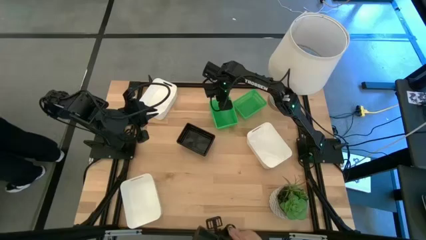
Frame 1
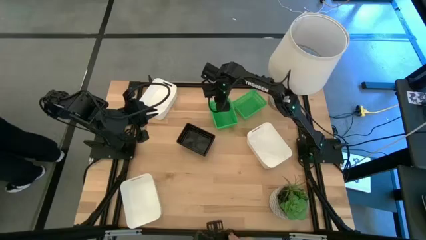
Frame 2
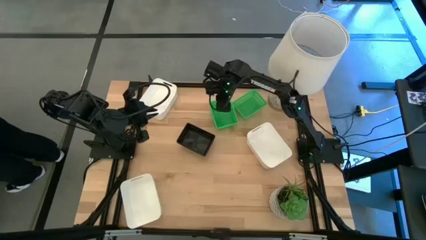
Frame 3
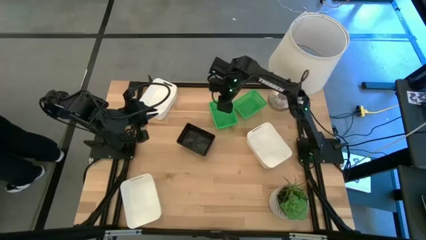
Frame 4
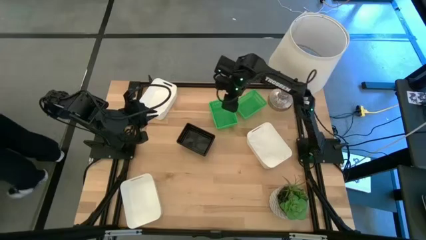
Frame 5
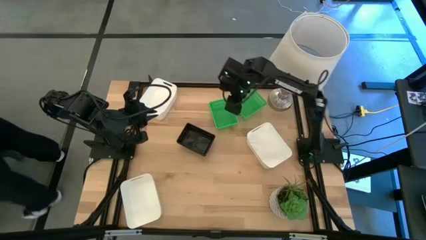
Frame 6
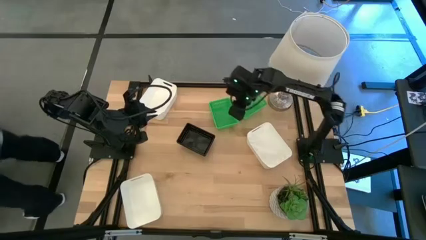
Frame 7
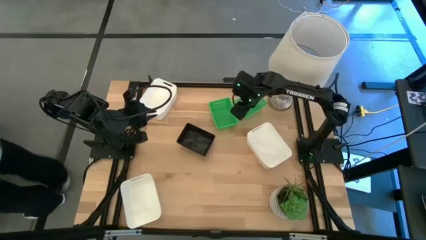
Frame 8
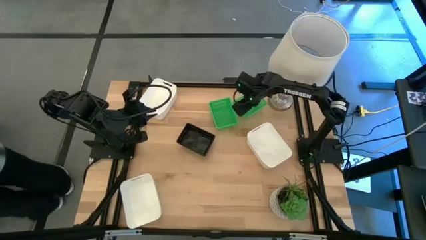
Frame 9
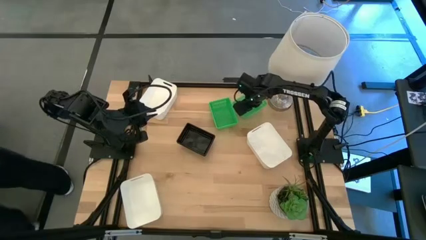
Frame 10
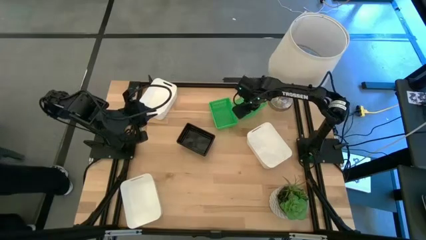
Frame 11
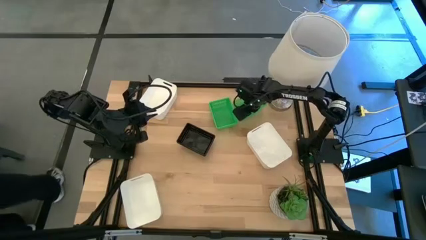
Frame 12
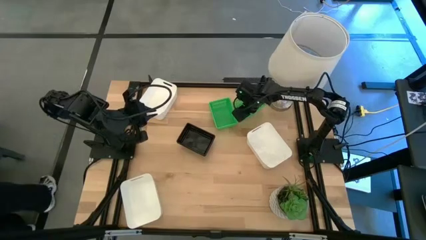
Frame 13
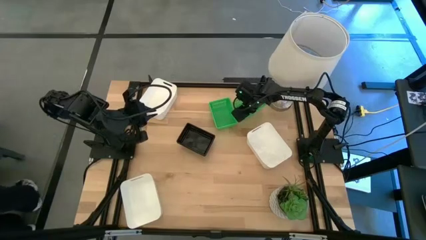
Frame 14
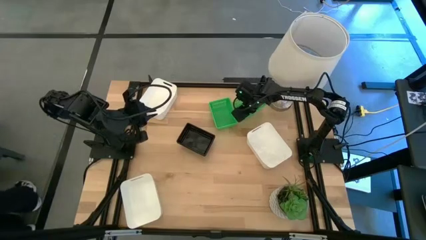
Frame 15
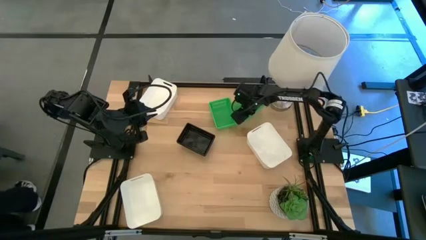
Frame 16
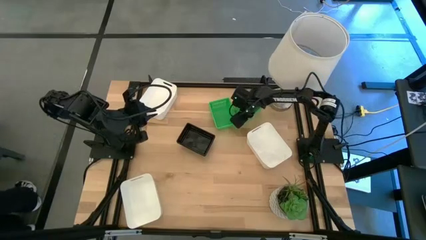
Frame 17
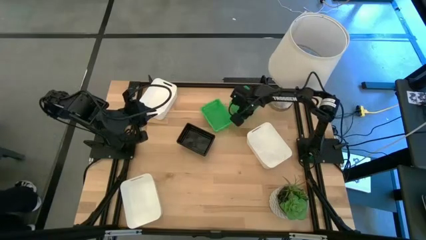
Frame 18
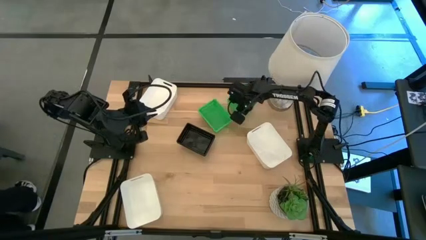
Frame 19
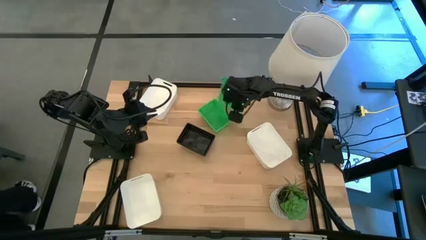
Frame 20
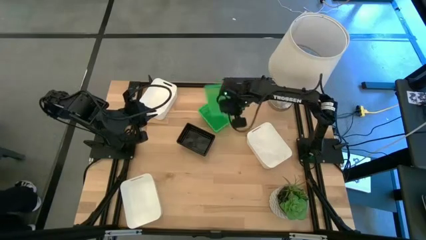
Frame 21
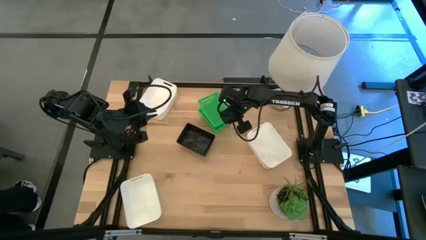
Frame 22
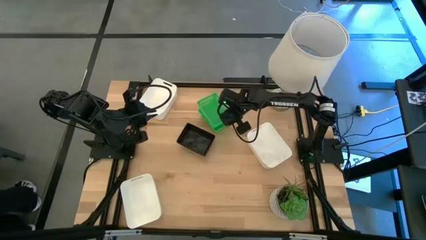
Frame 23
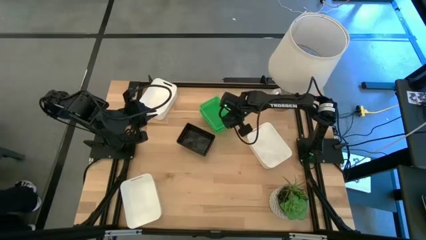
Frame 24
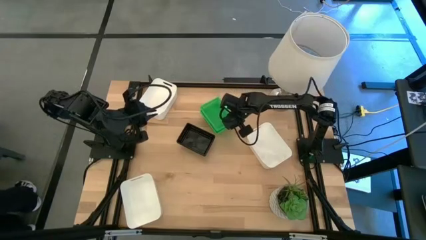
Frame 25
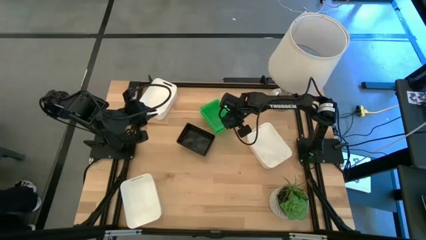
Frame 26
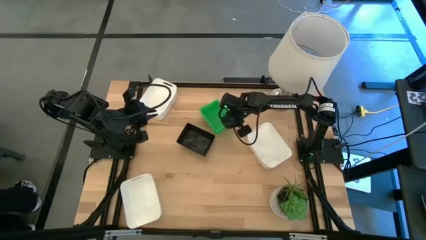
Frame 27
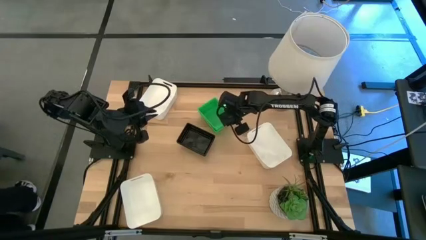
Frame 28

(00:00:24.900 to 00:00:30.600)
Stack the right green bin on the left green bins

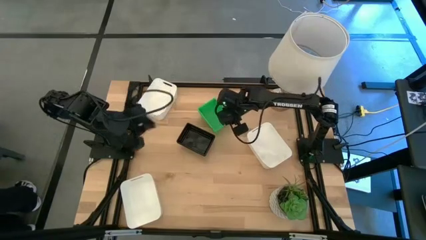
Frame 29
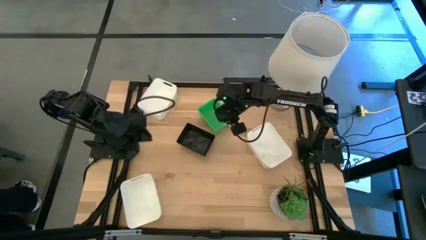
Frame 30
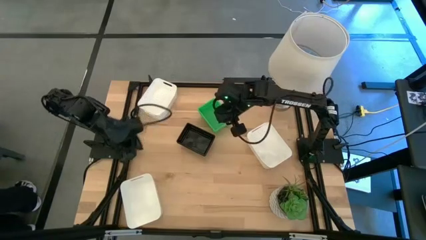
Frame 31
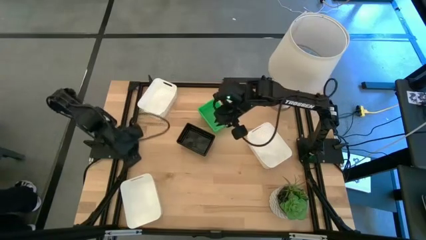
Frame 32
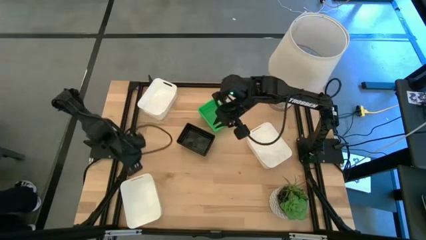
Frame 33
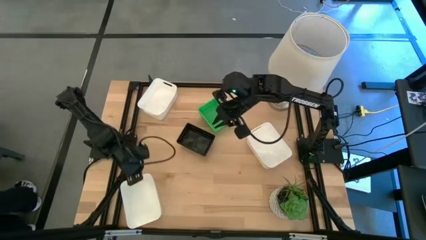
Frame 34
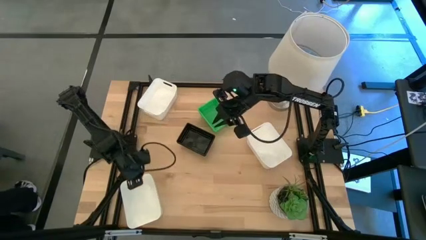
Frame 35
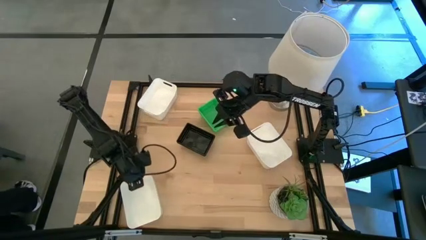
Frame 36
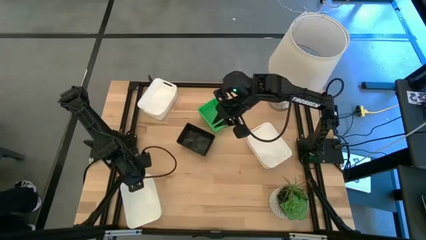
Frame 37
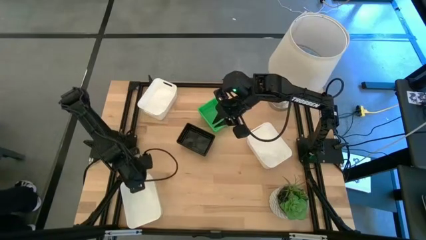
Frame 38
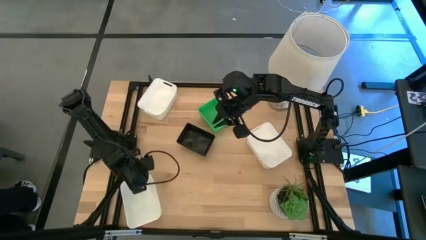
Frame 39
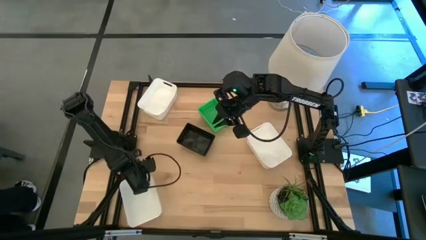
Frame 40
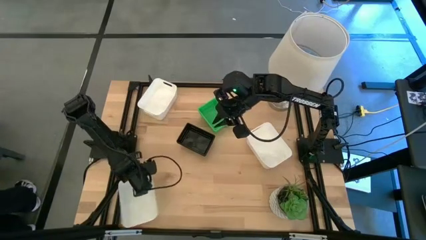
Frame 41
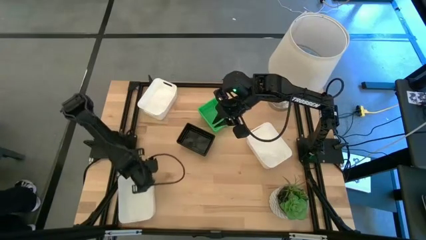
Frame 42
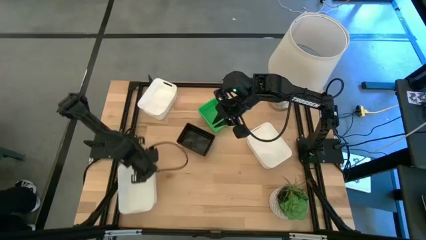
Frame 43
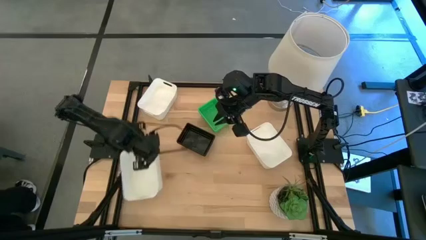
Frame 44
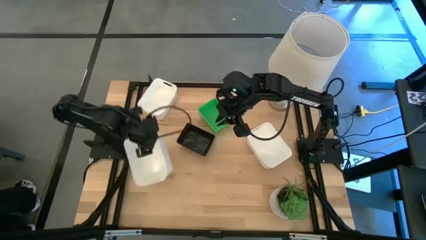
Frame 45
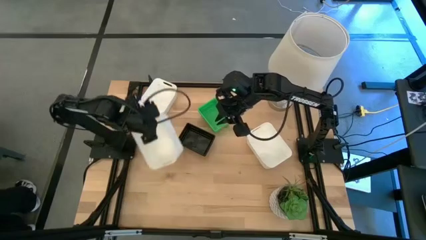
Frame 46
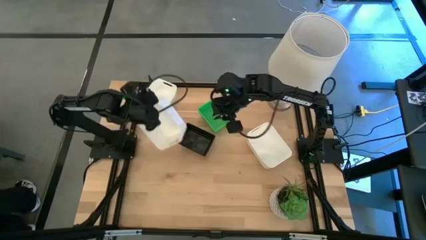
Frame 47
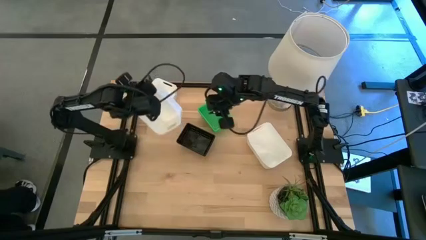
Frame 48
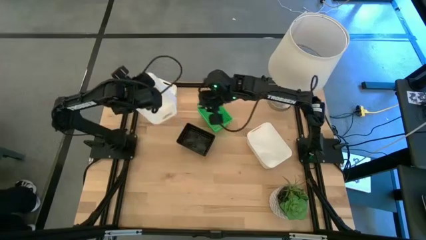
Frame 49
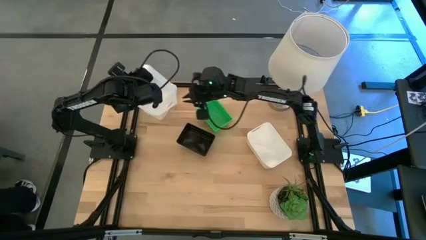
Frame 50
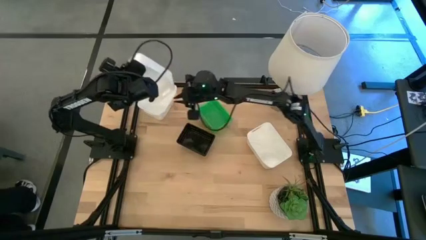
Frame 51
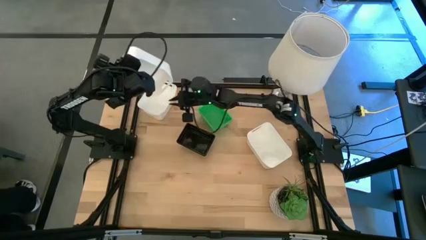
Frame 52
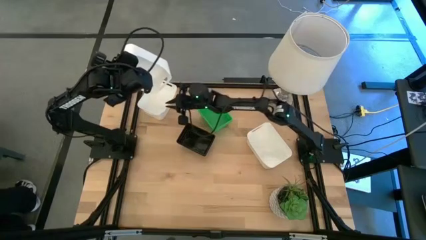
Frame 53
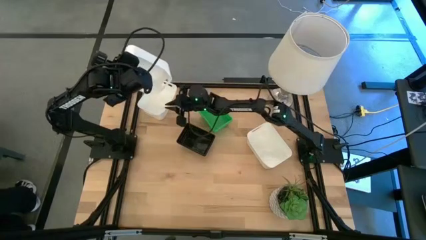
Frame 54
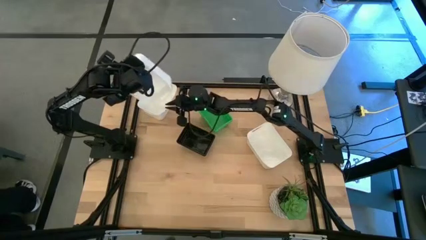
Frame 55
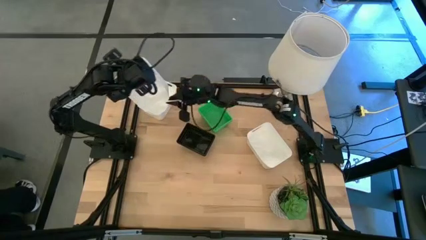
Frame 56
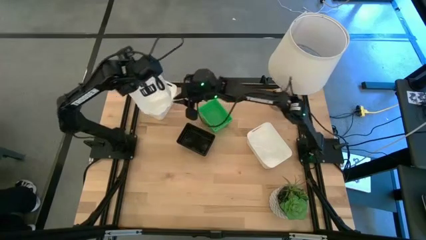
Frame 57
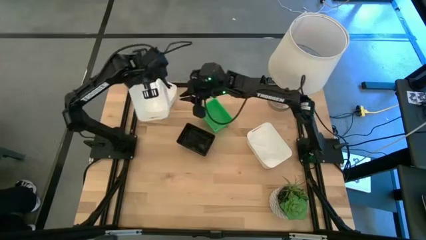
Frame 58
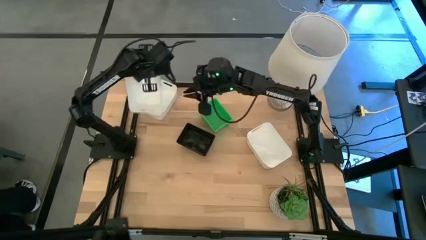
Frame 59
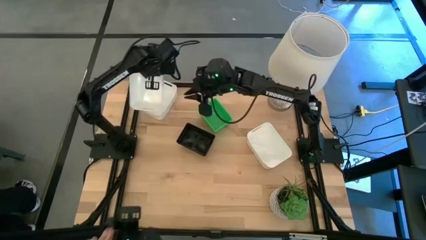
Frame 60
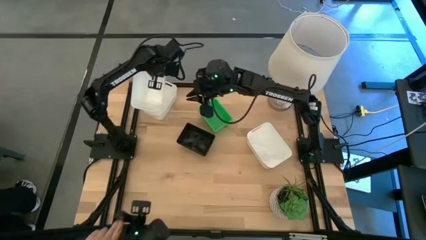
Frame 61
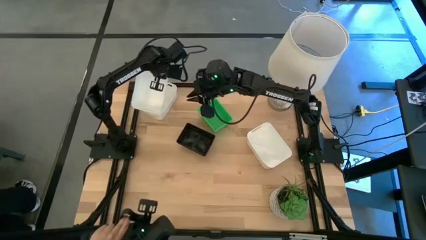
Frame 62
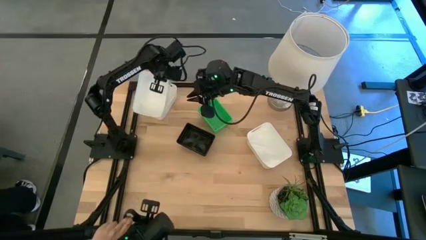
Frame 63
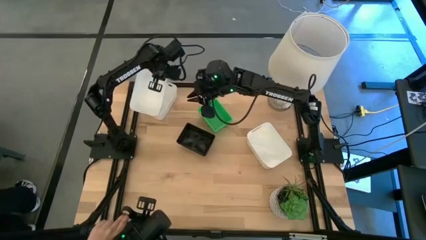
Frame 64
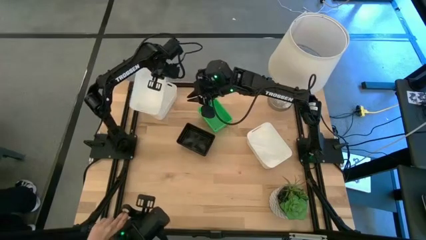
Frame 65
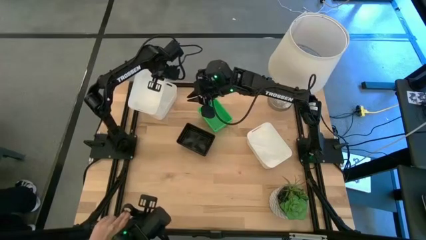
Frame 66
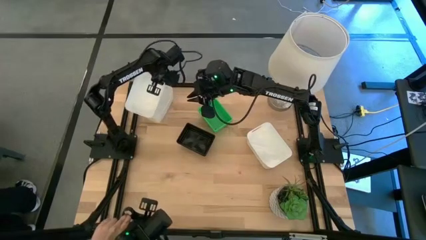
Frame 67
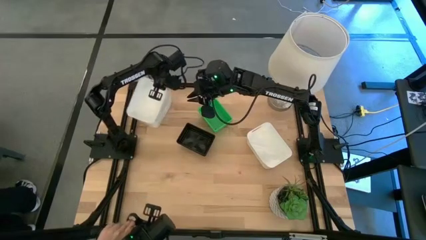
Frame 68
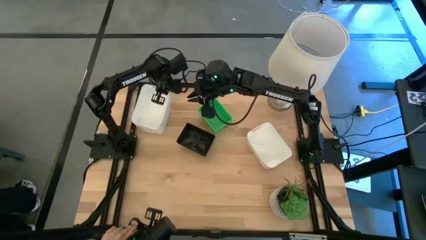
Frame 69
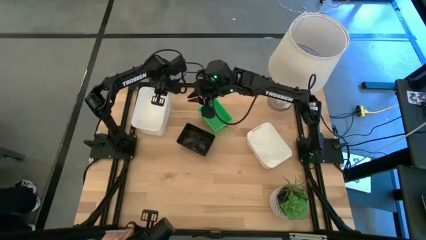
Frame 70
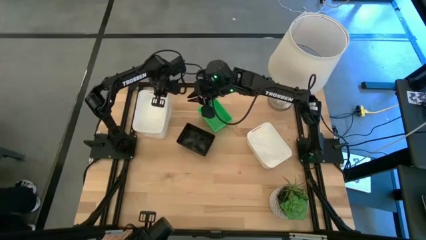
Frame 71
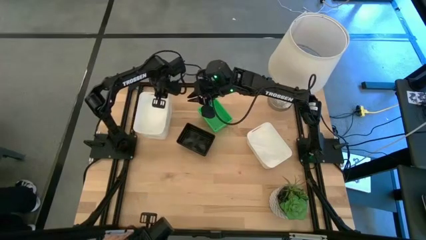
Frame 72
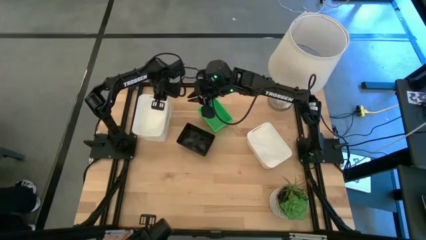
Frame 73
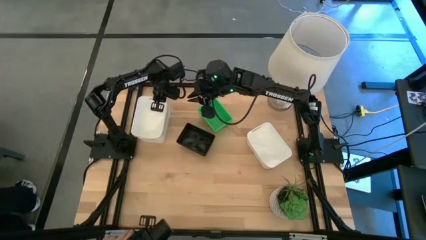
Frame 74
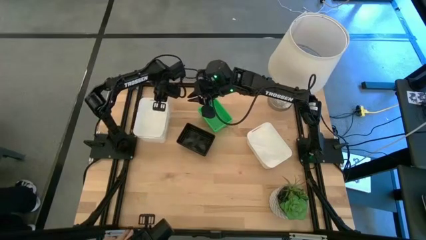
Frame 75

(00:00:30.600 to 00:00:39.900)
Stack the bottom white bin on the top white bin
